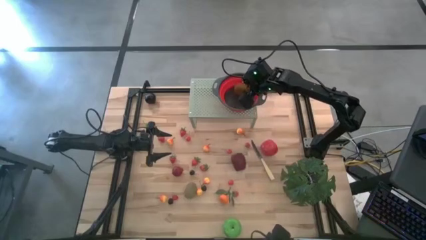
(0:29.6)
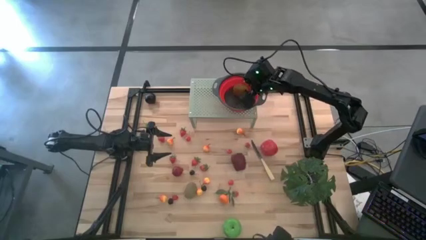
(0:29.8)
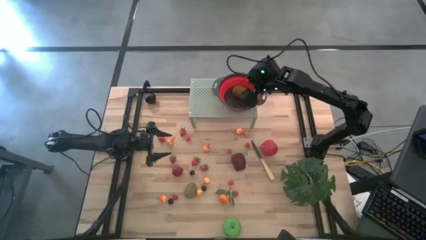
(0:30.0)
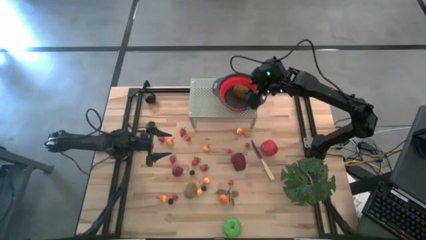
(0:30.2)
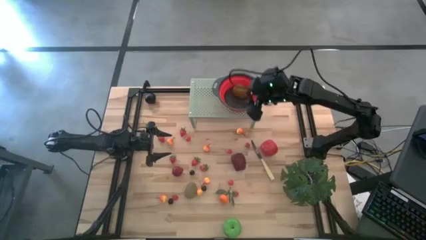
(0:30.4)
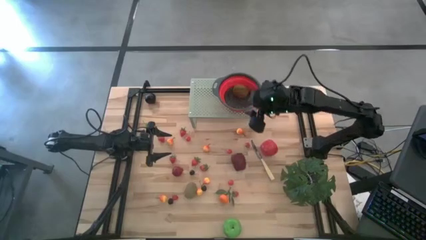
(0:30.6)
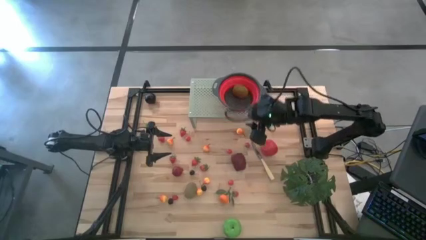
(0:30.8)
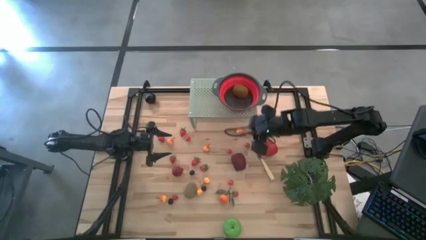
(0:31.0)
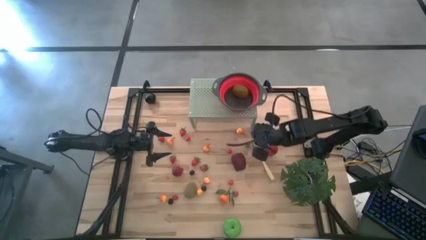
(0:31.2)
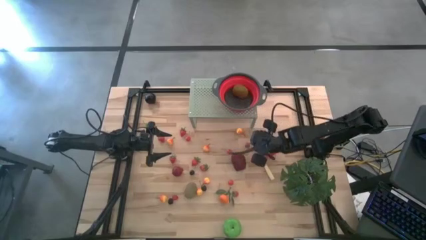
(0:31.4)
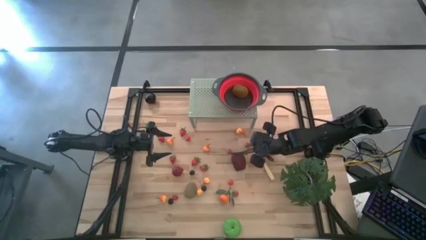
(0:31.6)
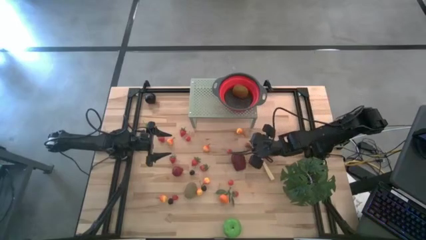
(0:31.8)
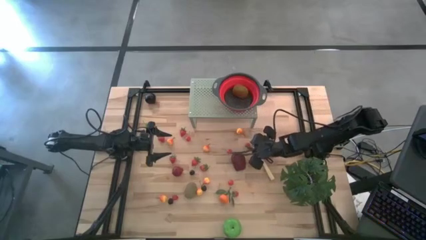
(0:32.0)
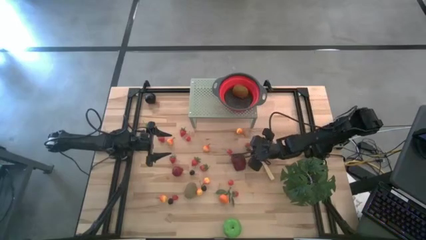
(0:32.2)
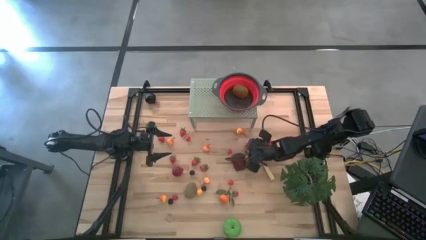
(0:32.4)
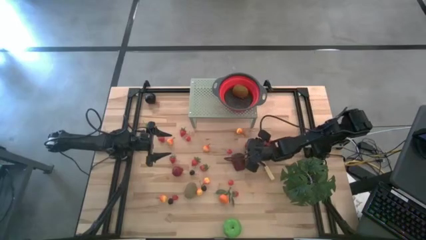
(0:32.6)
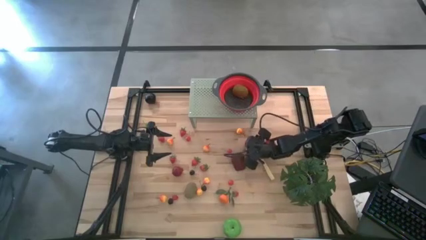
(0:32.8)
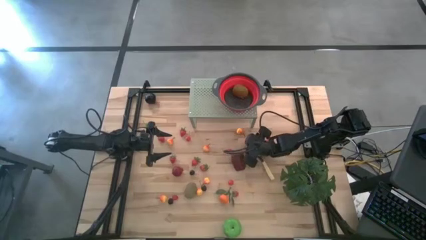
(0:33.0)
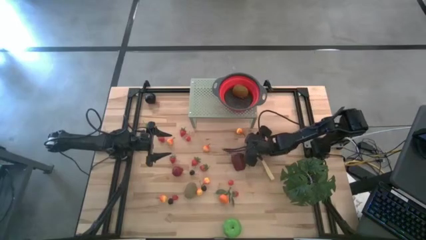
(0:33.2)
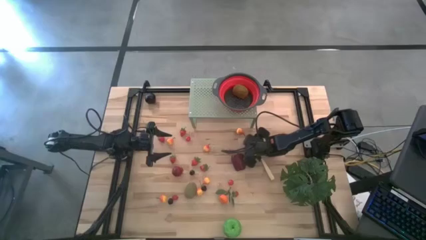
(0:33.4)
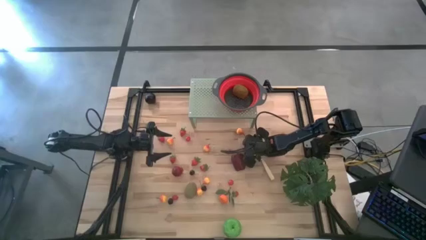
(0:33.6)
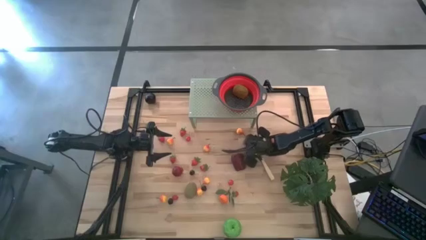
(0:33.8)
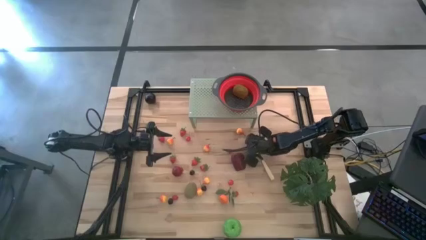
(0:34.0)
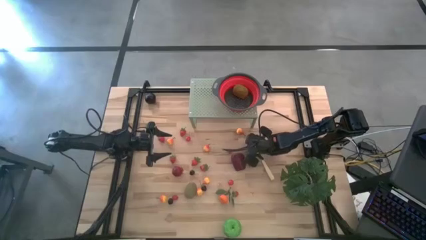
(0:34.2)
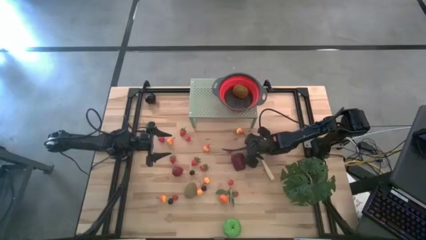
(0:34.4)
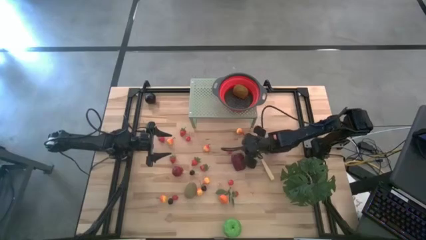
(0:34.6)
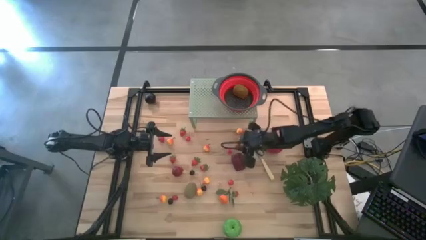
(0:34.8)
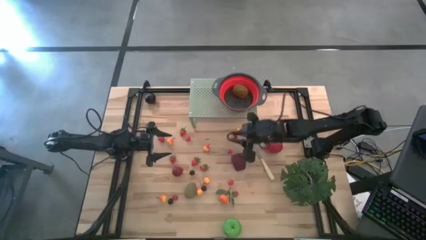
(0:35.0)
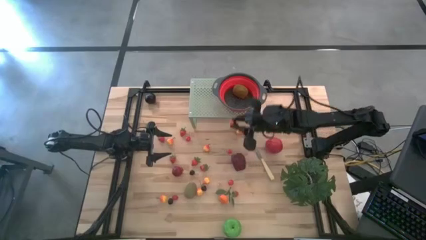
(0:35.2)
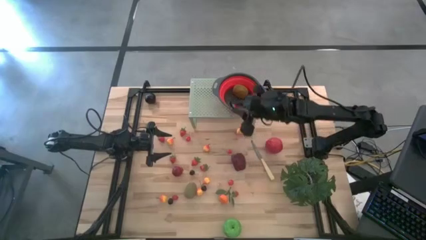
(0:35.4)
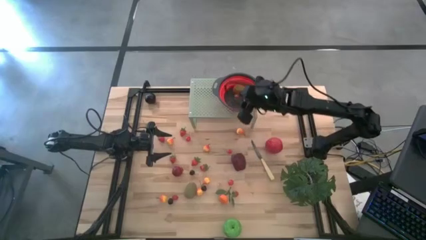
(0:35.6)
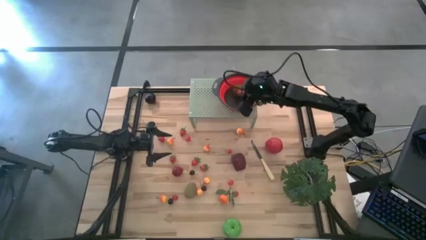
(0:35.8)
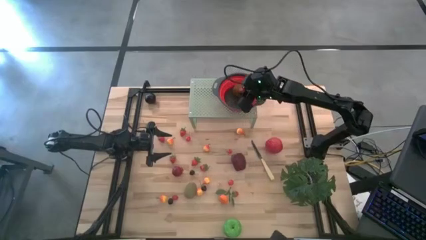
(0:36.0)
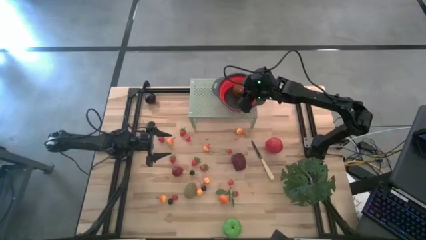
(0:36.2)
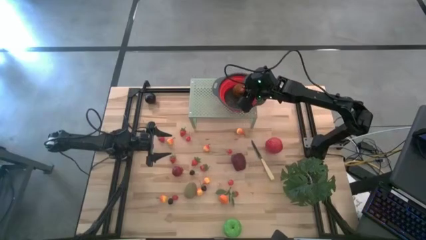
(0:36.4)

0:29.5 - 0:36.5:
Task: Pick & Place Fruit
Put the red strawberry into the black strainer bowl on the shelf

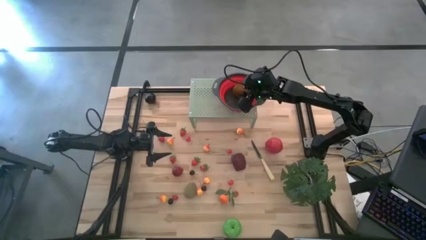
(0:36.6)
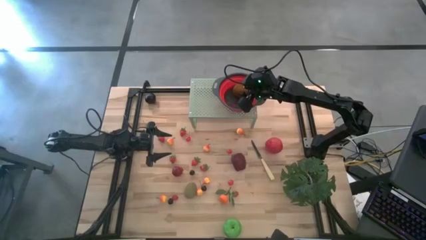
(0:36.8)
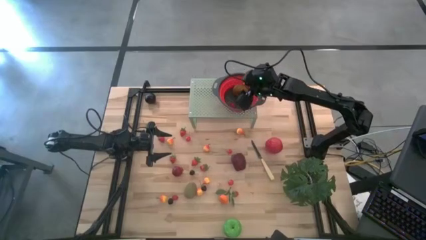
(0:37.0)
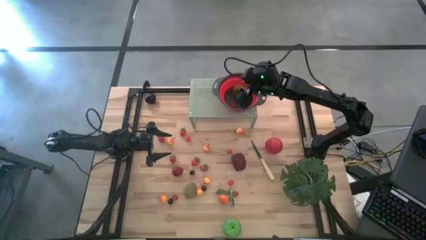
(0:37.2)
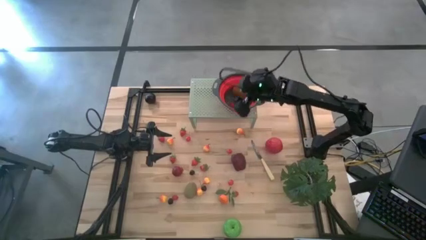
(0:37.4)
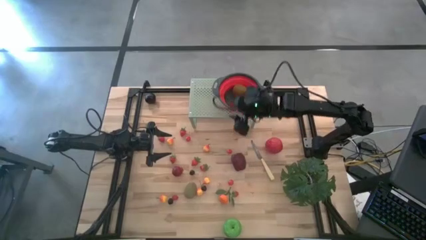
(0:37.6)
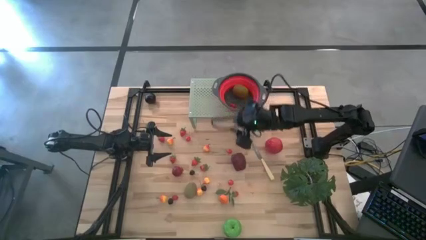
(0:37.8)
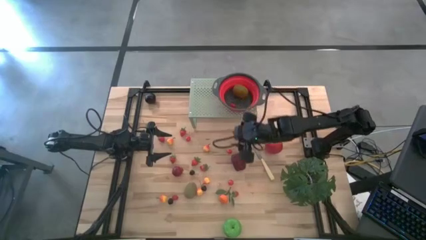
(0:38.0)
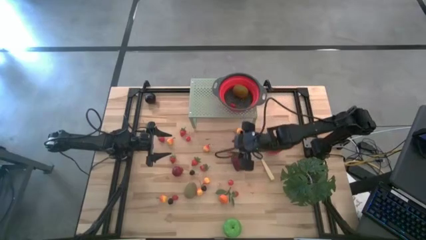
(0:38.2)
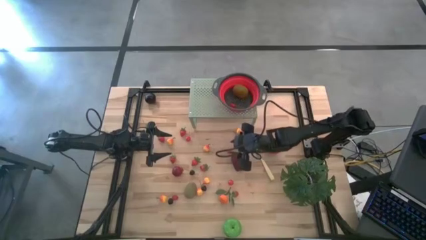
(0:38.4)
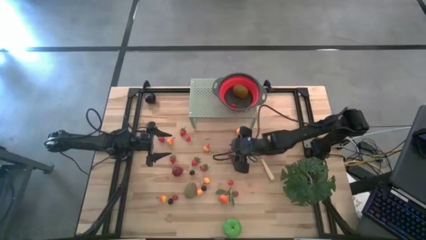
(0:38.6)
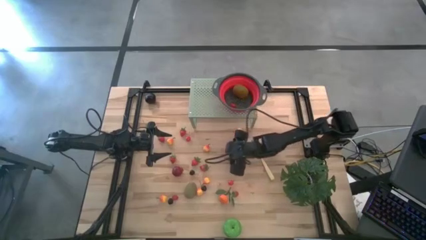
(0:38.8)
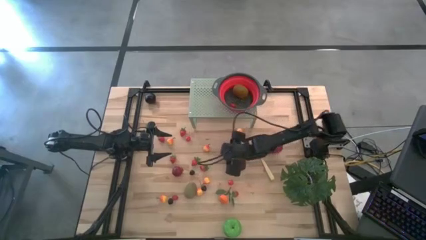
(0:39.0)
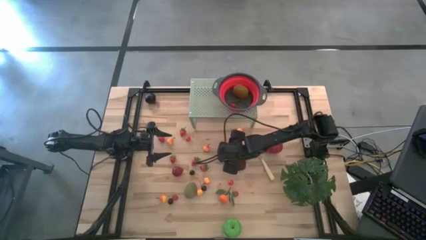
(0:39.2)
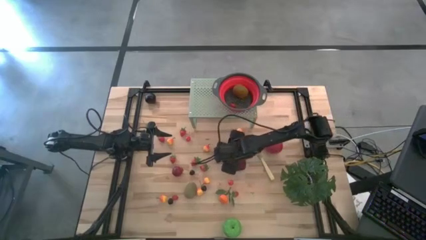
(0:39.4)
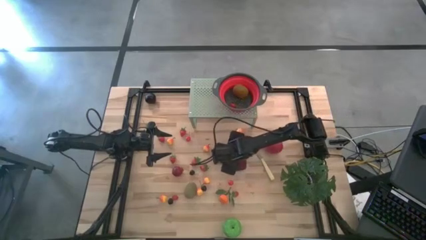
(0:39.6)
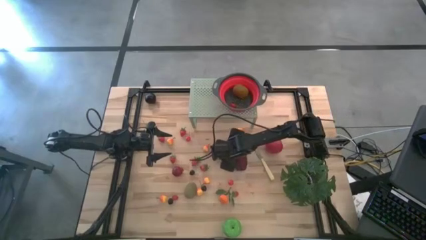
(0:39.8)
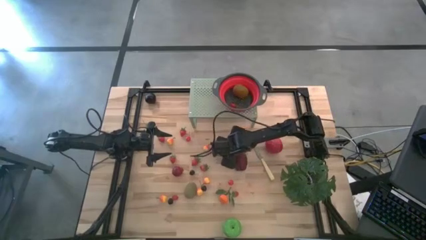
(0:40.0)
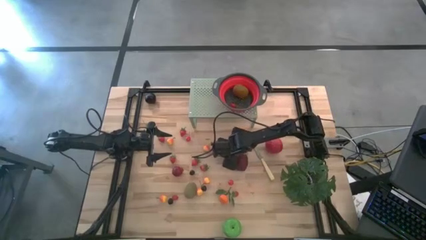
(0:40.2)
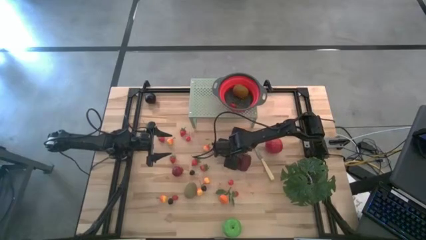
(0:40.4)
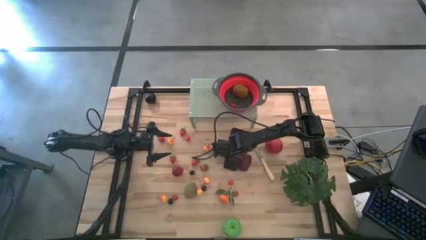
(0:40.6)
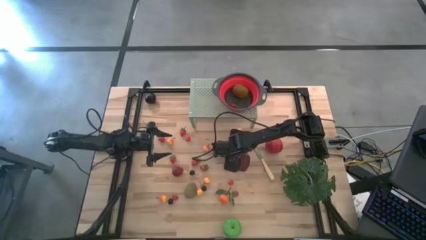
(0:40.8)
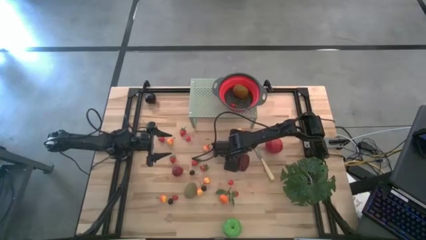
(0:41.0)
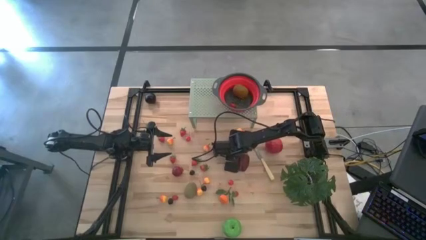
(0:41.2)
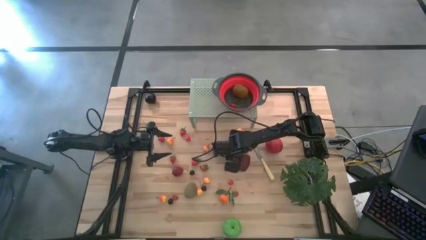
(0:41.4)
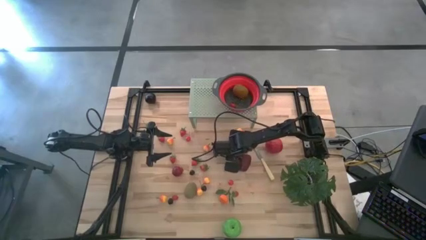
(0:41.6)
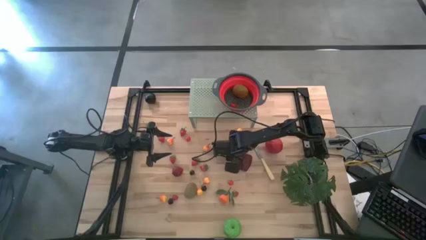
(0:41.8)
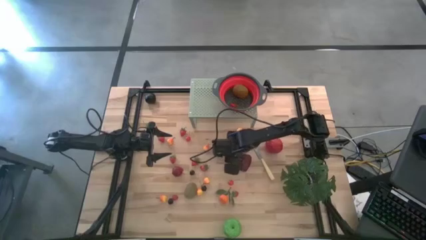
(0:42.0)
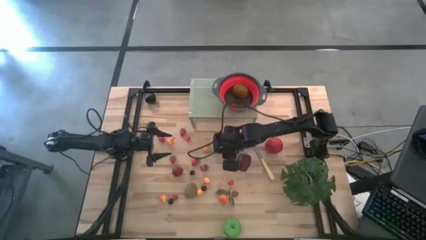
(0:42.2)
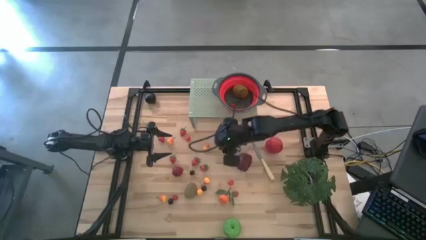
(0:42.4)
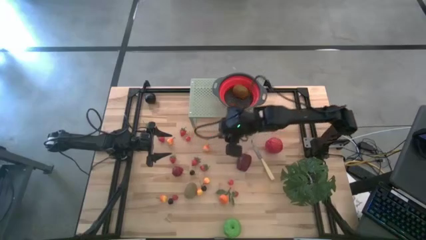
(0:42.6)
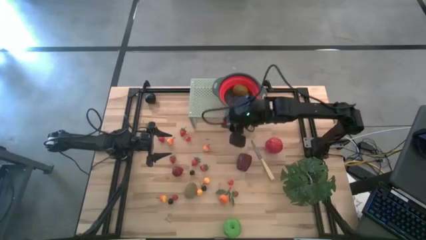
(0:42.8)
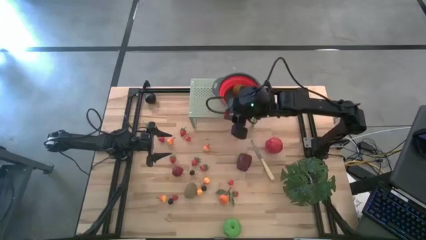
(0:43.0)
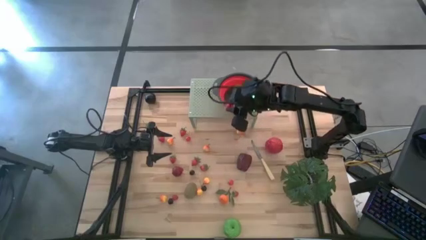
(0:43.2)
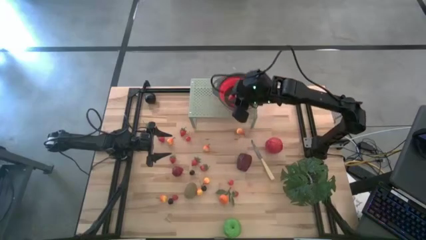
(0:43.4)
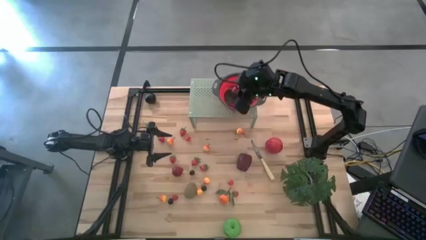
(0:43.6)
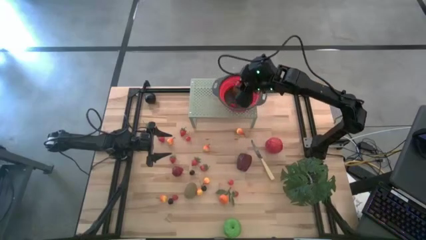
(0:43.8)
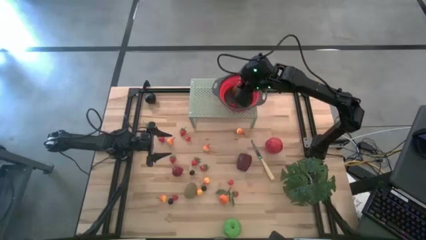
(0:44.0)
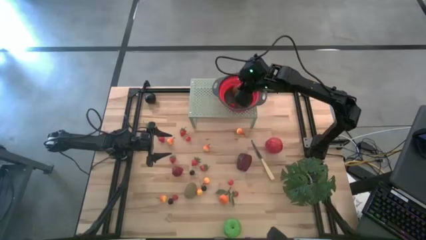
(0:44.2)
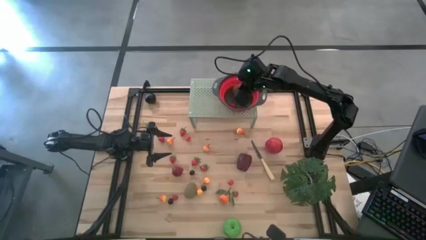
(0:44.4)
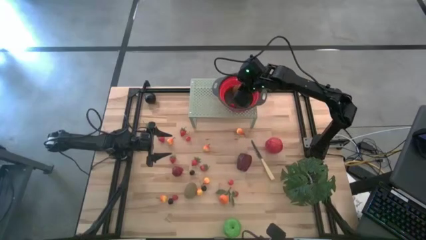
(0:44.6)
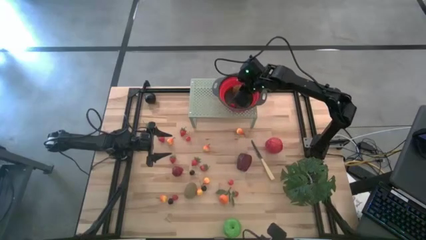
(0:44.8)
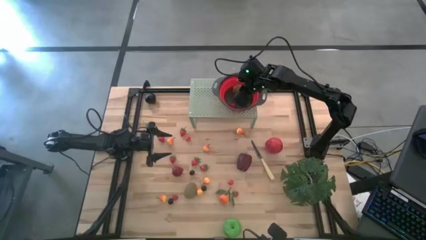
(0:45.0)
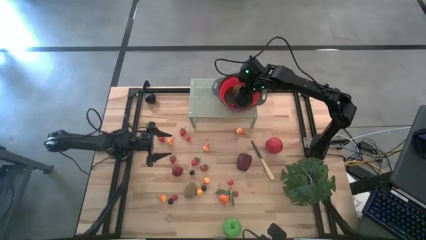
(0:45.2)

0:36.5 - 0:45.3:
Put the red cherry into the black strainer bowl on the shelf
